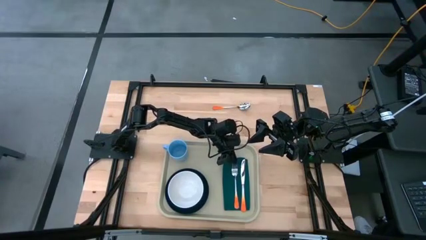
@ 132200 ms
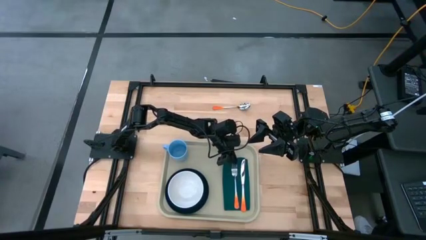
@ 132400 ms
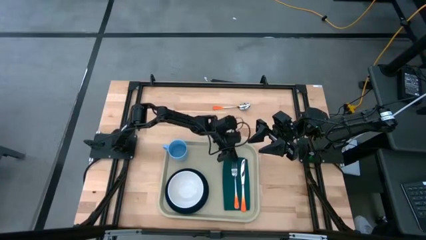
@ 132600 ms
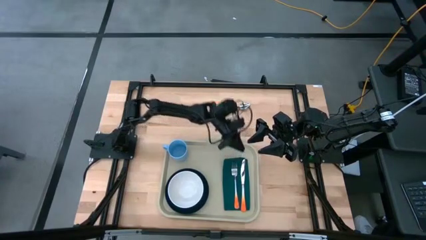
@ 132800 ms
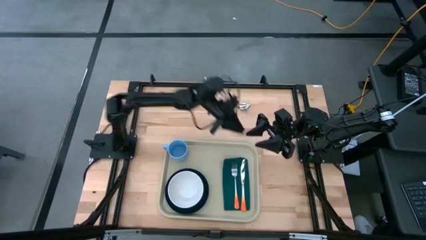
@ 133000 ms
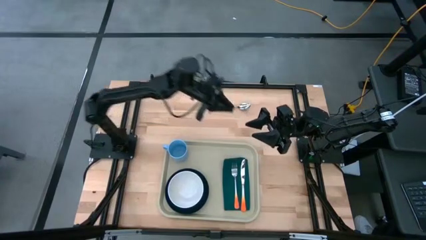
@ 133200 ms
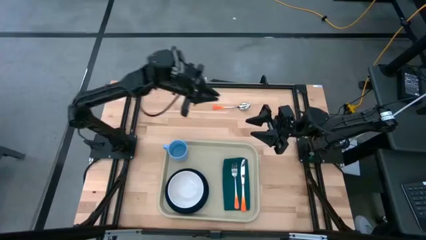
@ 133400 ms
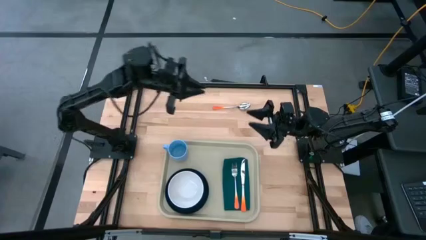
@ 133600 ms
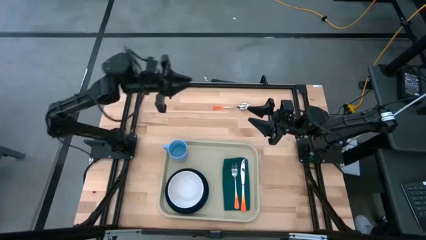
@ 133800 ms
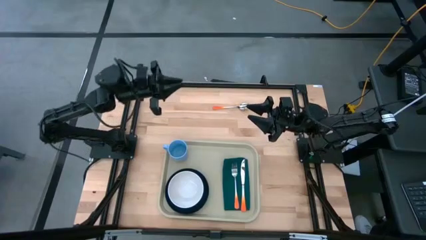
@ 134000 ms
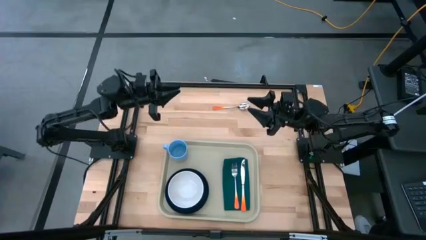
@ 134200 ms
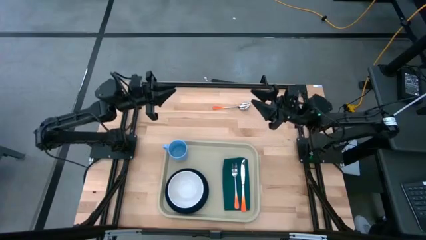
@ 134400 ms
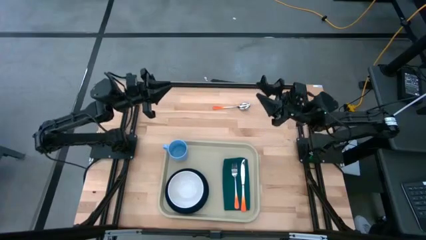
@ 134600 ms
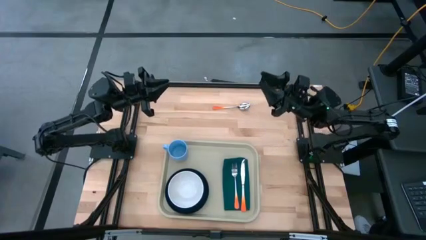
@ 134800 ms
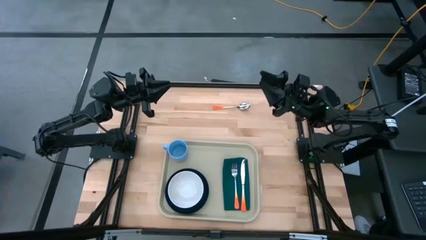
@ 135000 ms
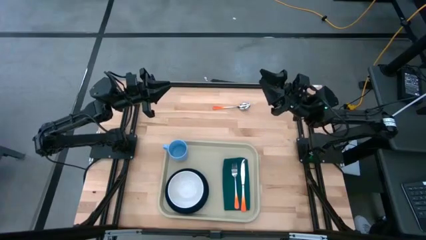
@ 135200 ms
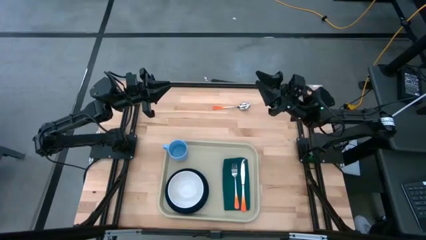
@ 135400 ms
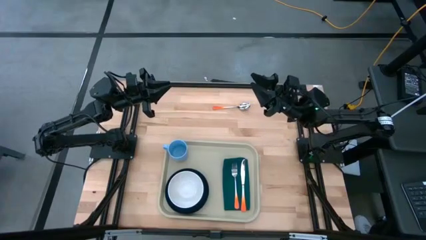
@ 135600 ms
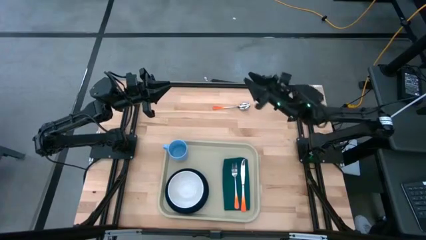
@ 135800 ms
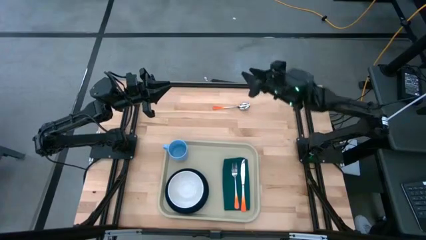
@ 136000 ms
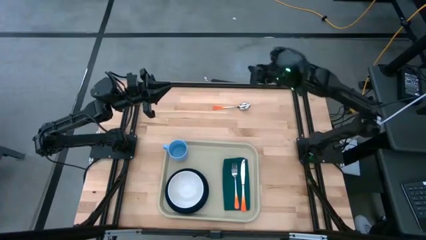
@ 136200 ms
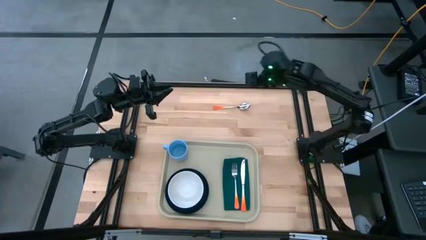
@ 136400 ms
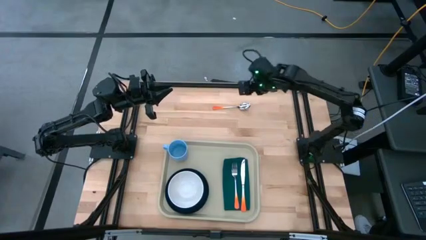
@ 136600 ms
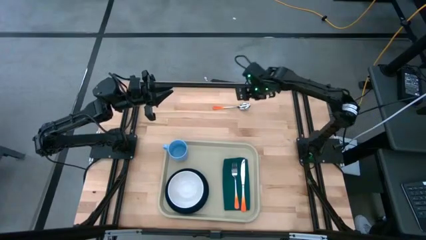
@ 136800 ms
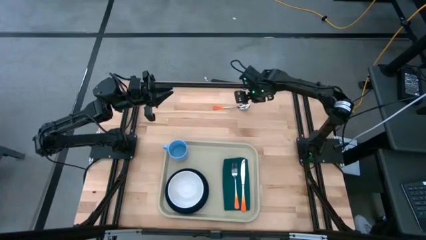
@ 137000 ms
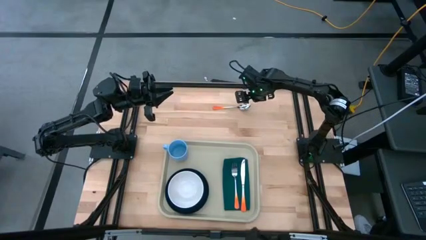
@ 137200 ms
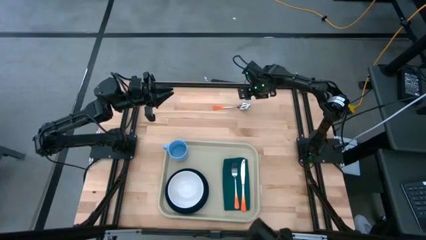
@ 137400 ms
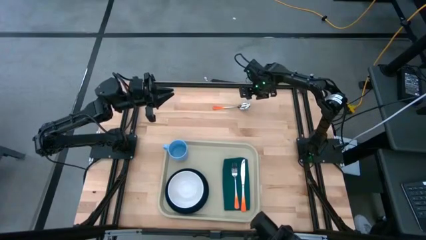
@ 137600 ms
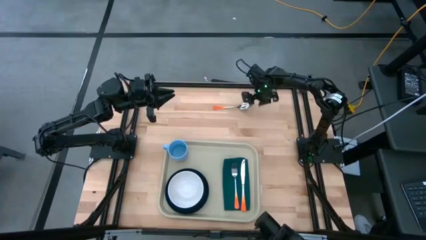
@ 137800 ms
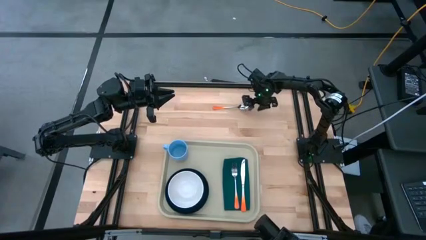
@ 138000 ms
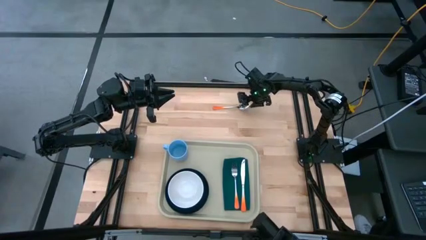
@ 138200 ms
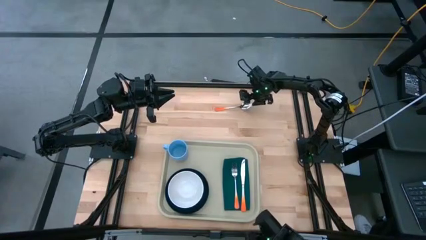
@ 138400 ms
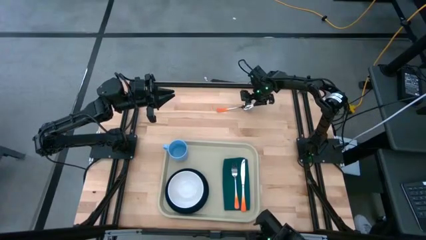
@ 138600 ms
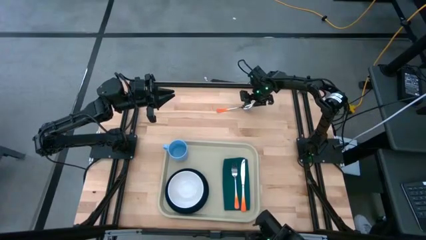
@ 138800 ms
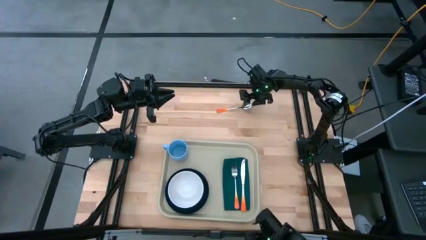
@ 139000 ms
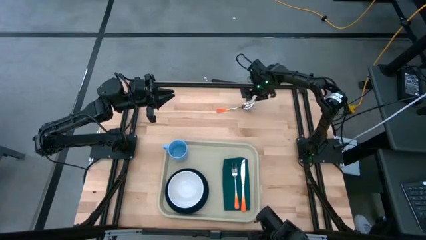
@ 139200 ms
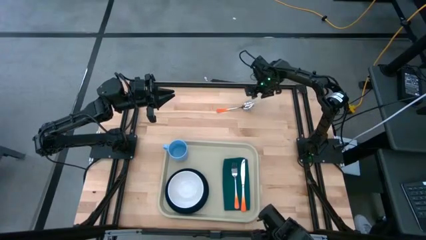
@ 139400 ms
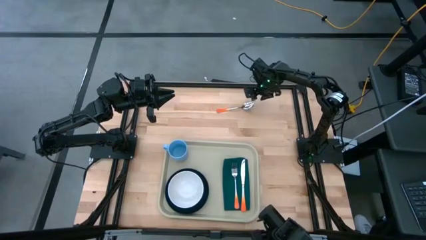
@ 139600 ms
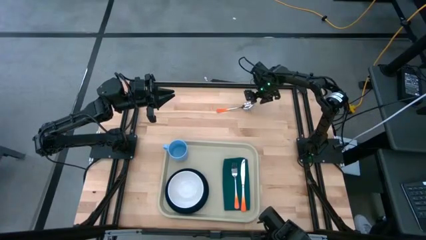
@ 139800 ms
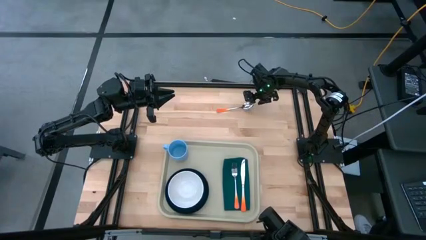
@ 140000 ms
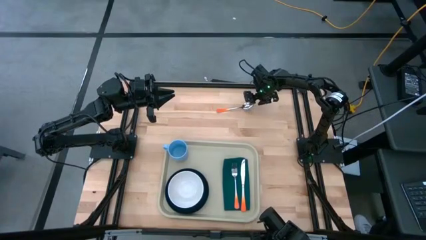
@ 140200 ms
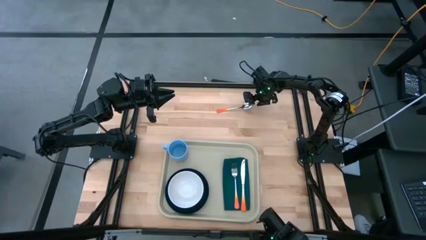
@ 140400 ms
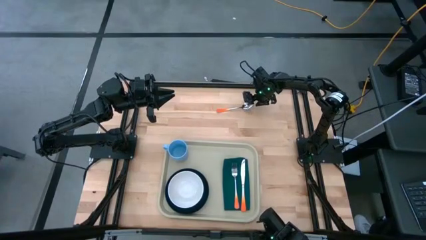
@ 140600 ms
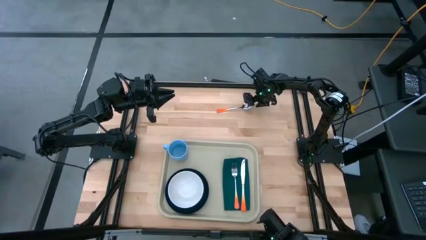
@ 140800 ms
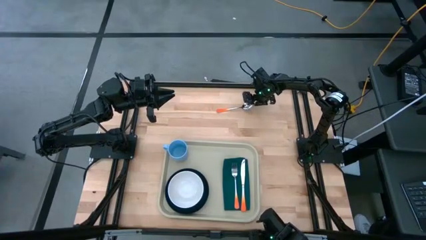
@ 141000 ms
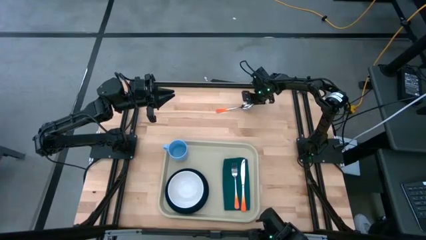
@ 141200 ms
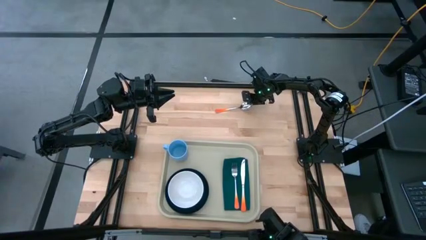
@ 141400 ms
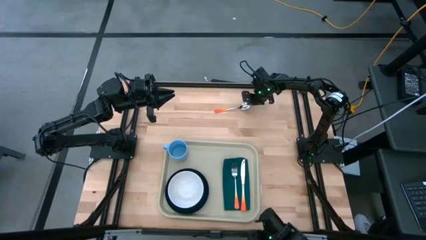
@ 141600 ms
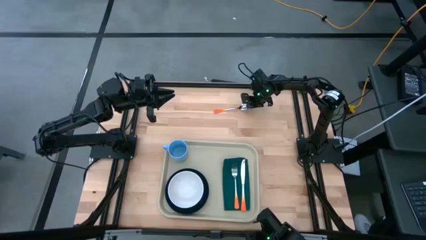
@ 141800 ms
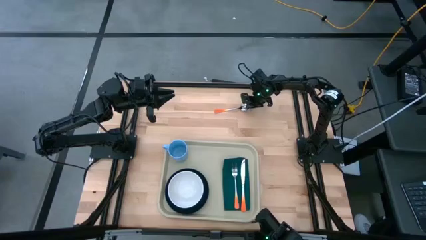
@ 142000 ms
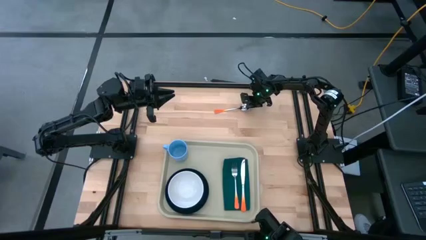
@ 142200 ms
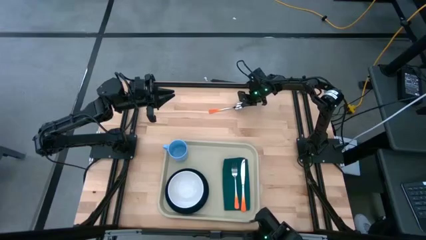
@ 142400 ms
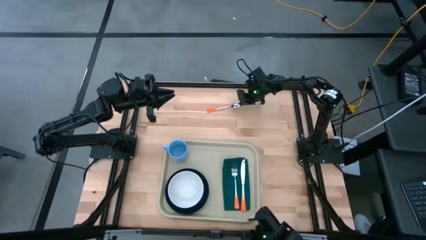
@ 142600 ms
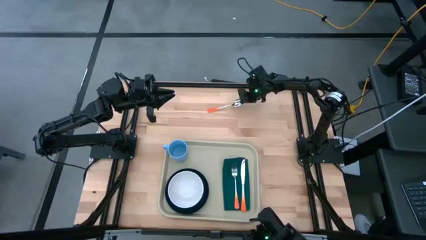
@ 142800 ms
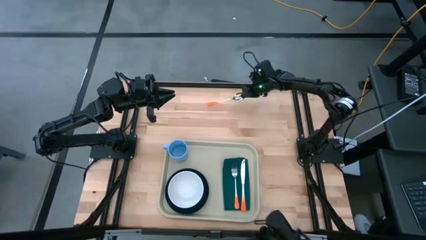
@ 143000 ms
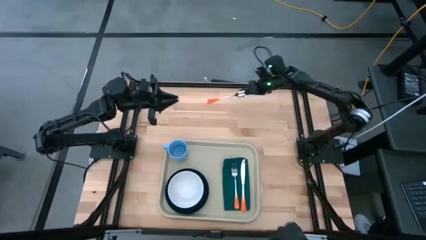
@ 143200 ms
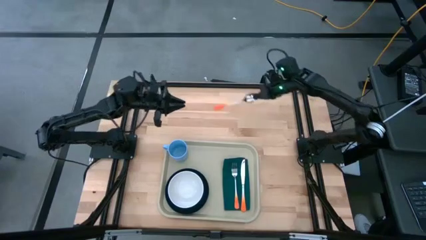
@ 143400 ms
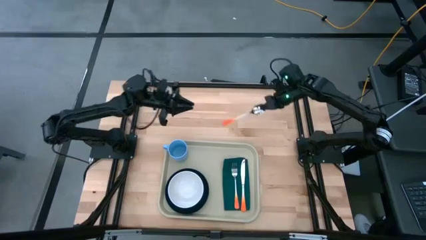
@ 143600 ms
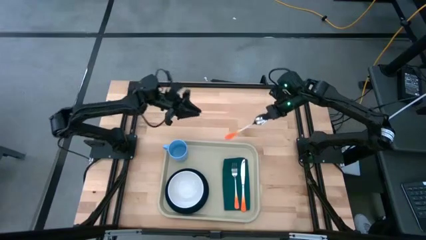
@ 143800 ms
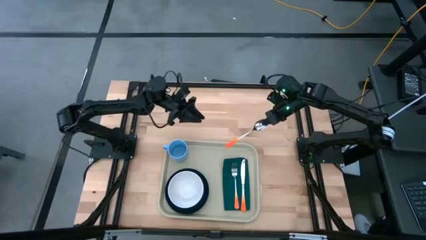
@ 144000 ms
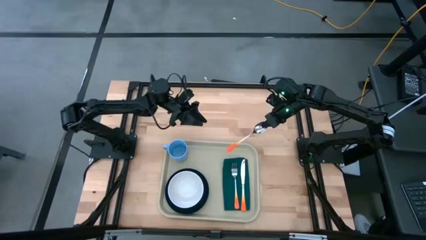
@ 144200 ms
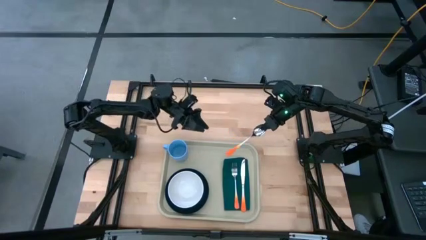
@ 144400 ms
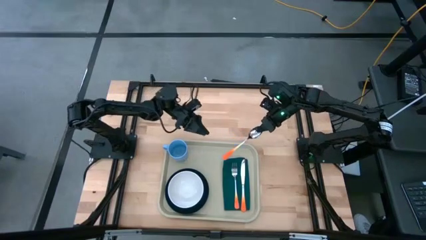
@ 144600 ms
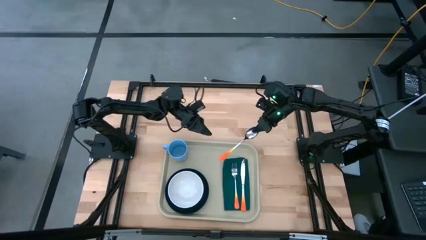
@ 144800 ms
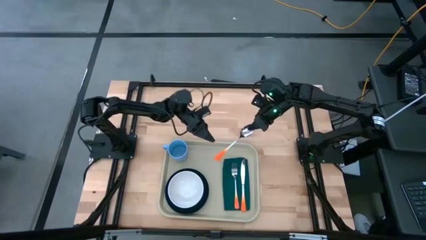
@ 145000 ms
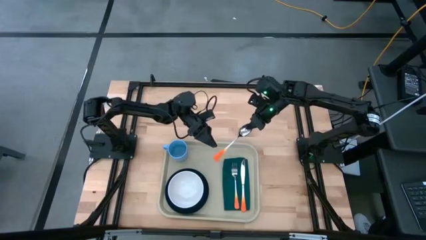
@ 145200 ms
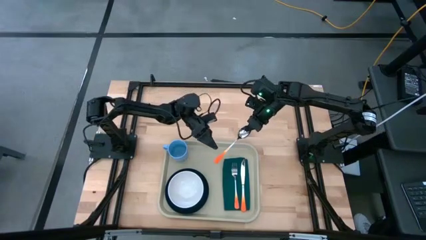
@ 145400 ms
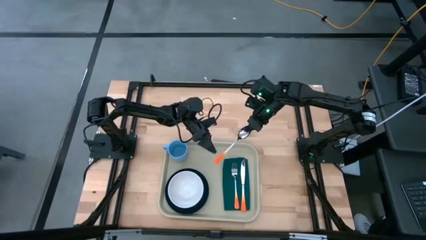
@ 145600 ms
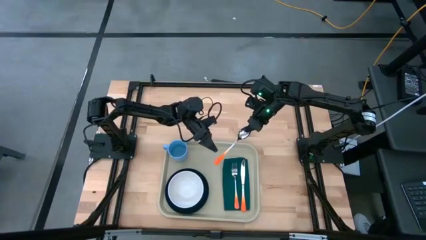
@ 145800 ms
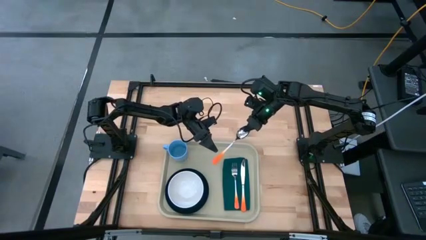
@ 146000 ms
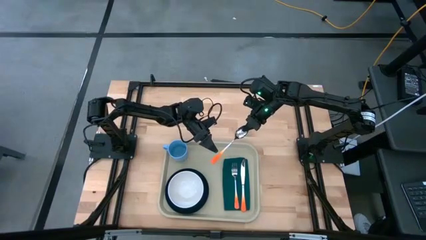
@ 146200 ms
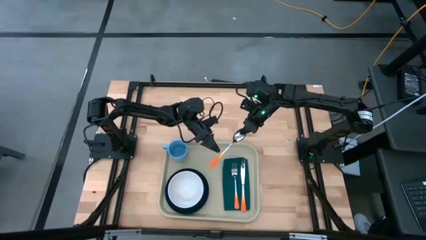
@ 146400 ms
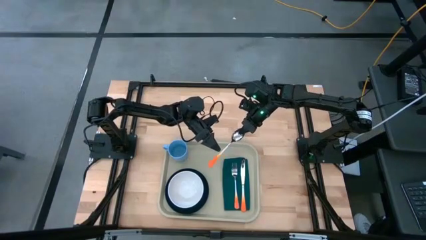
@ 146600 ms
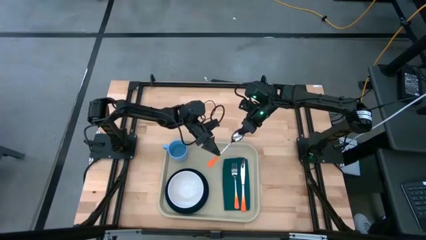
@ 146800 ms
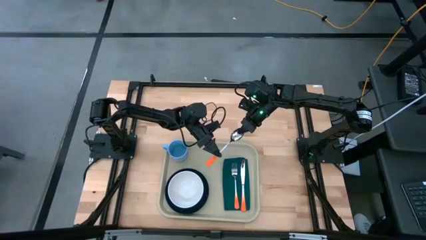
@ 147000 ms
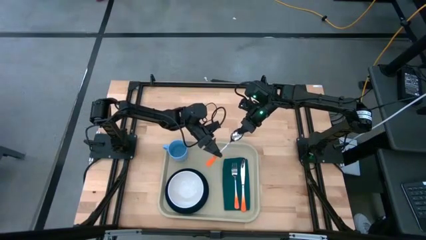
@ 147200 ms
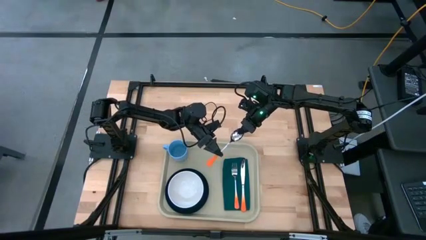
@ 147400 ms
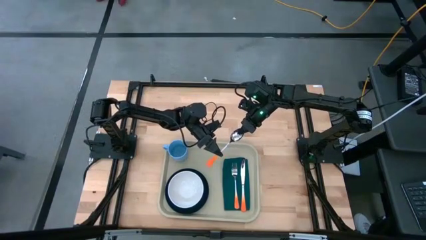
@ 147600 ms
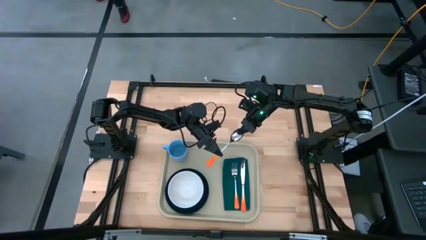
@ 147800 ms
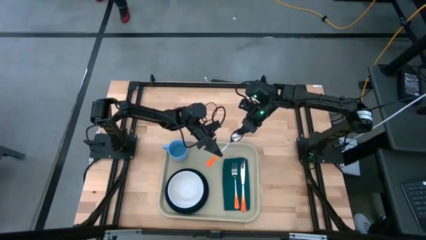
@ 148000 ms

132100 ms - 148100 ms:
Task: Set up tray
Put the orange spoon on top of the napkin to the left of the orange fork
